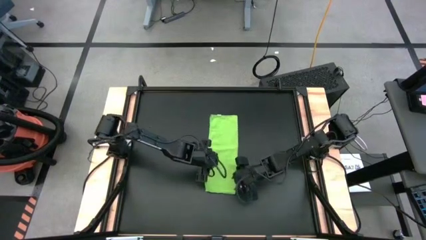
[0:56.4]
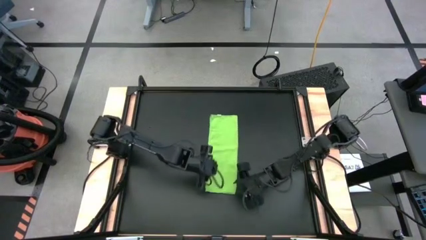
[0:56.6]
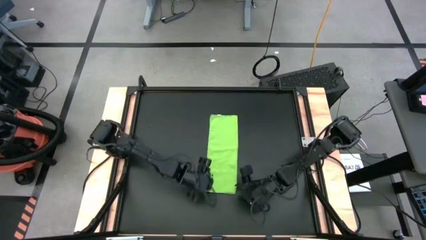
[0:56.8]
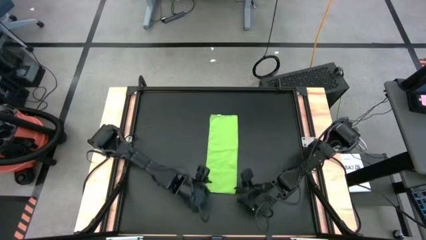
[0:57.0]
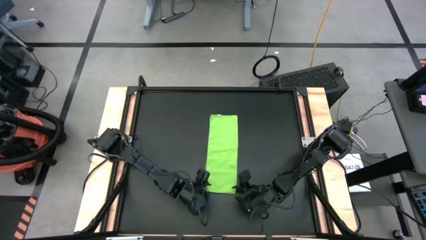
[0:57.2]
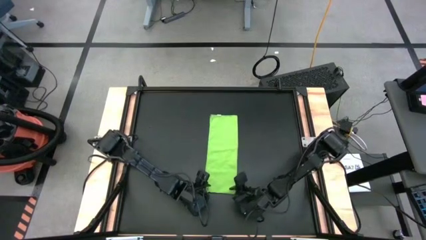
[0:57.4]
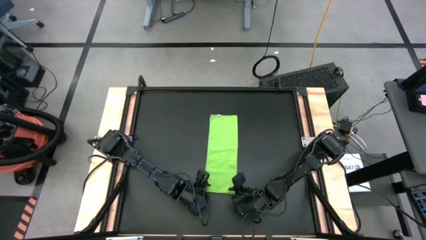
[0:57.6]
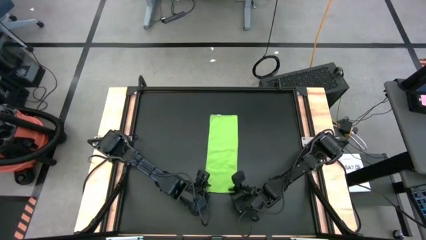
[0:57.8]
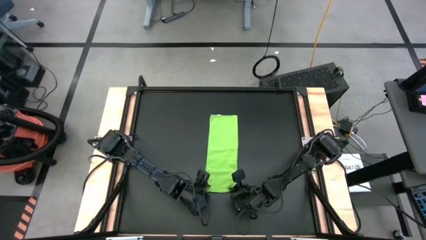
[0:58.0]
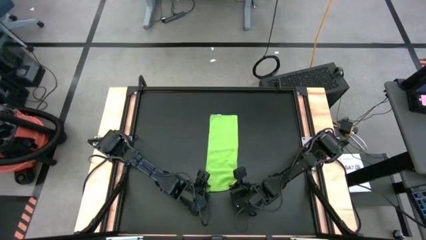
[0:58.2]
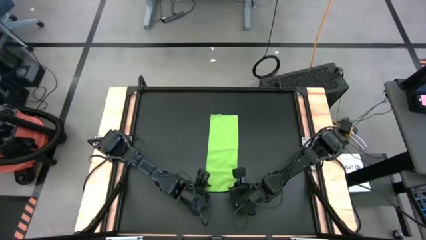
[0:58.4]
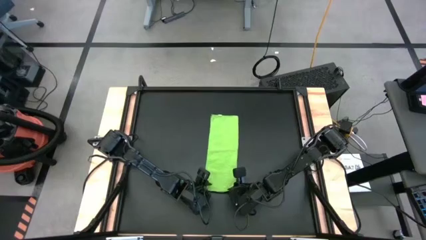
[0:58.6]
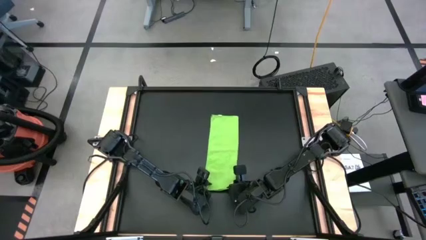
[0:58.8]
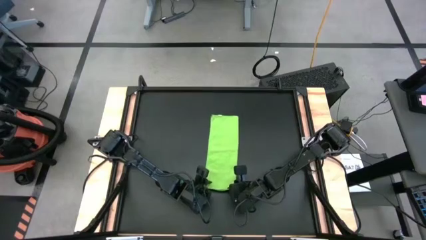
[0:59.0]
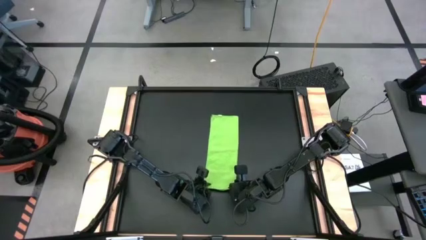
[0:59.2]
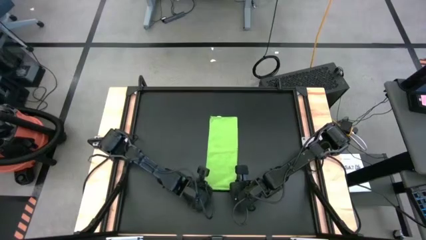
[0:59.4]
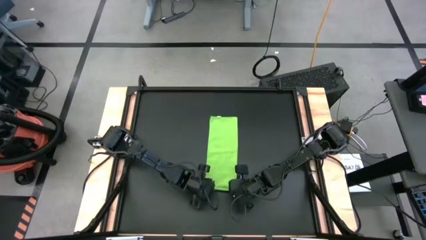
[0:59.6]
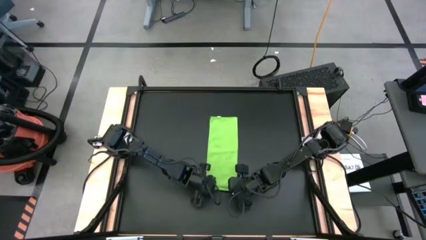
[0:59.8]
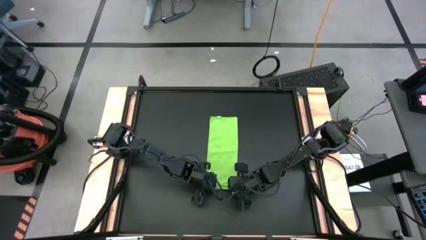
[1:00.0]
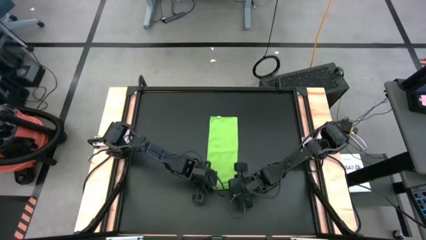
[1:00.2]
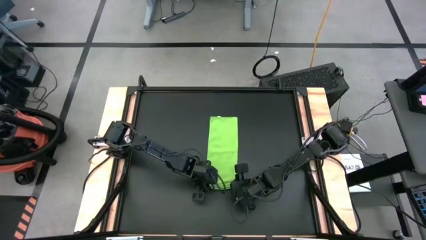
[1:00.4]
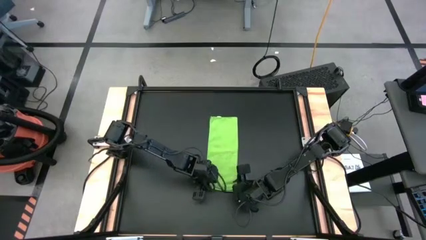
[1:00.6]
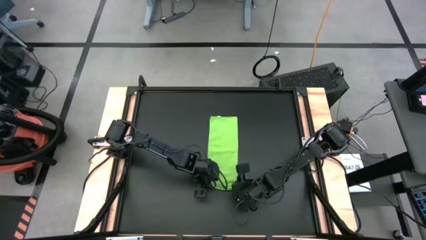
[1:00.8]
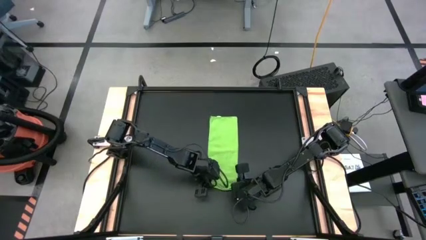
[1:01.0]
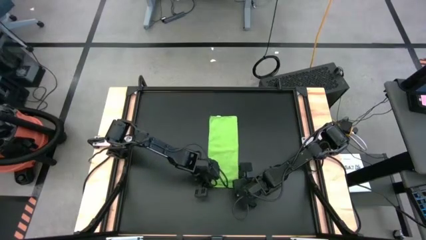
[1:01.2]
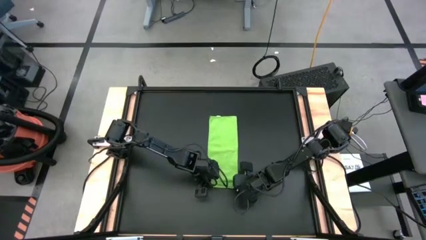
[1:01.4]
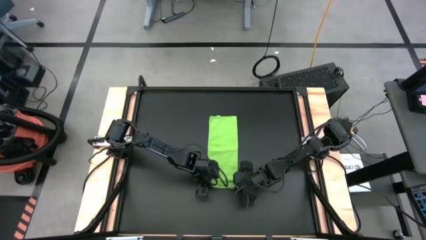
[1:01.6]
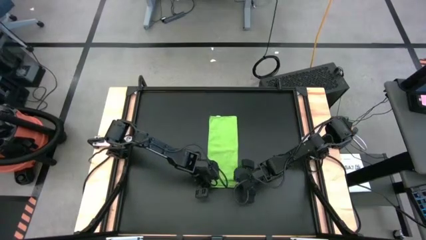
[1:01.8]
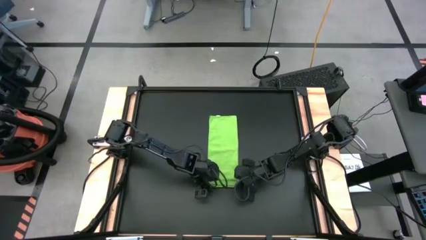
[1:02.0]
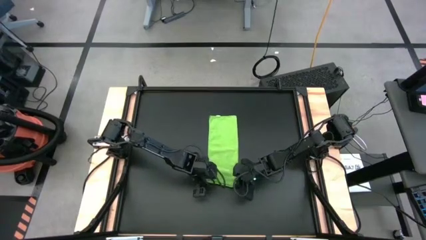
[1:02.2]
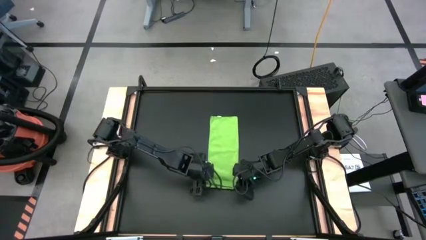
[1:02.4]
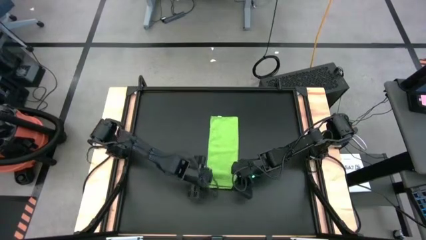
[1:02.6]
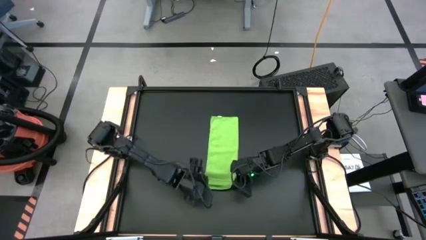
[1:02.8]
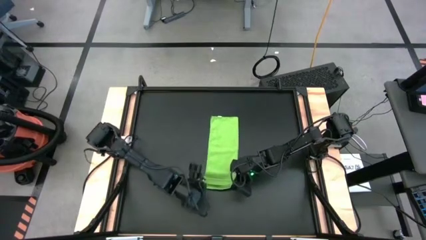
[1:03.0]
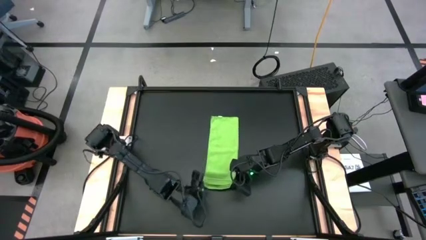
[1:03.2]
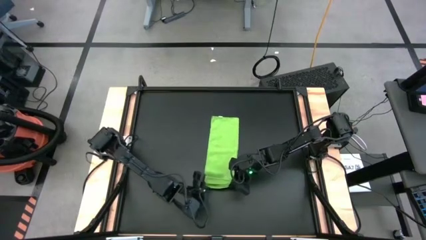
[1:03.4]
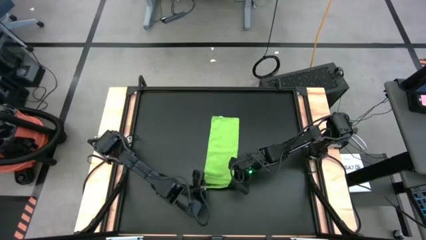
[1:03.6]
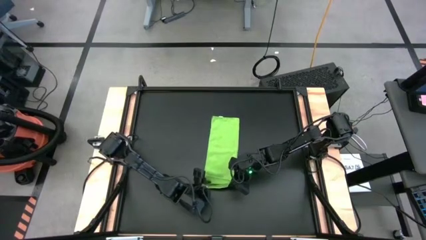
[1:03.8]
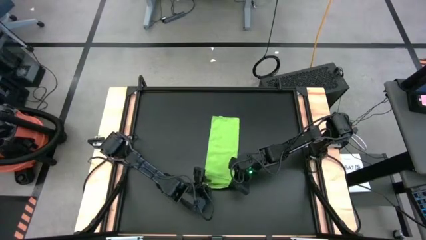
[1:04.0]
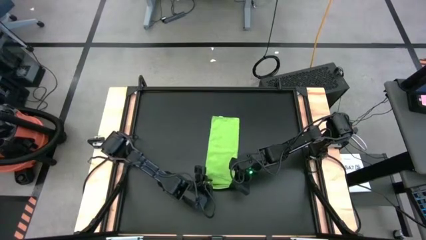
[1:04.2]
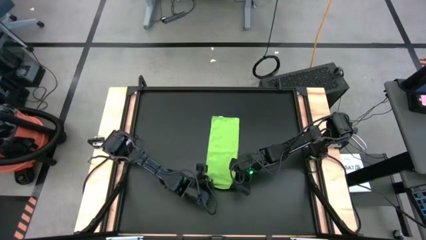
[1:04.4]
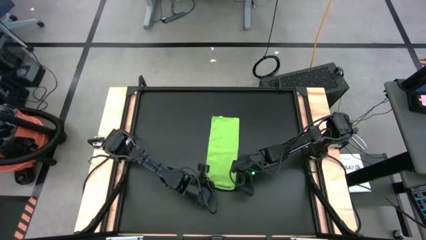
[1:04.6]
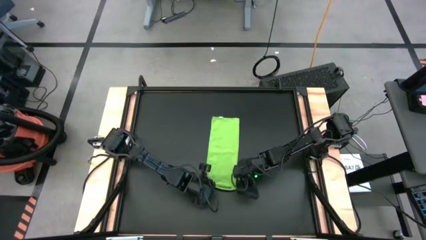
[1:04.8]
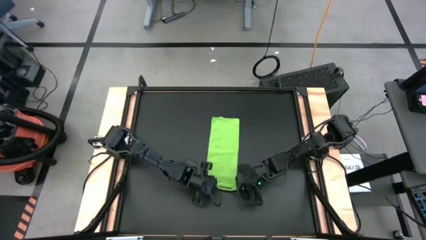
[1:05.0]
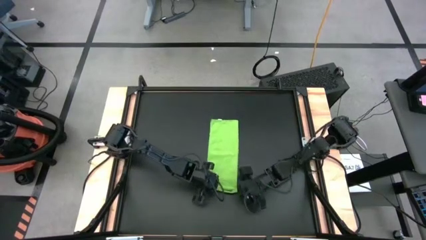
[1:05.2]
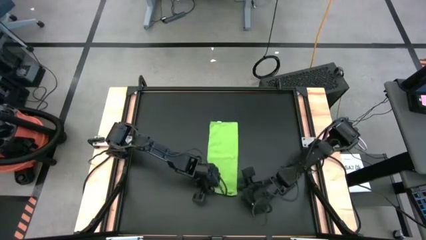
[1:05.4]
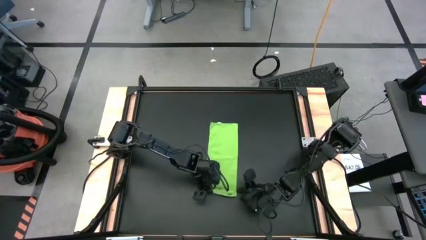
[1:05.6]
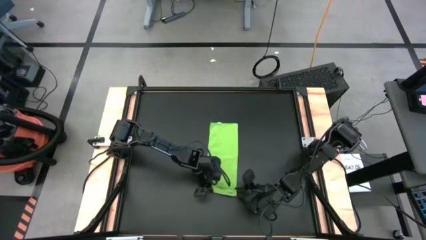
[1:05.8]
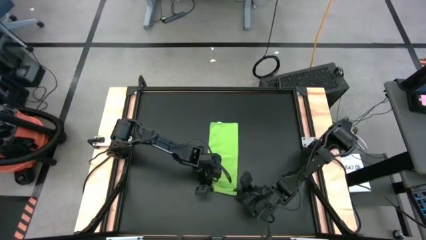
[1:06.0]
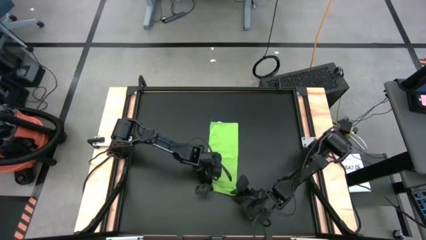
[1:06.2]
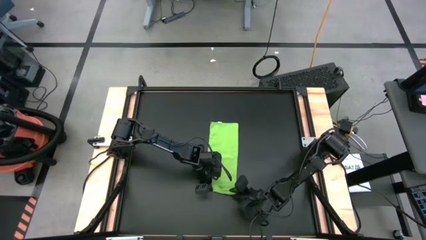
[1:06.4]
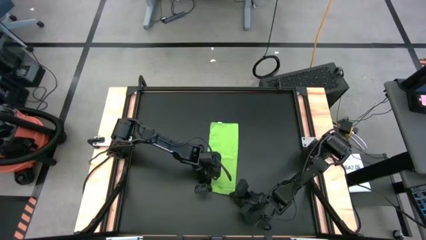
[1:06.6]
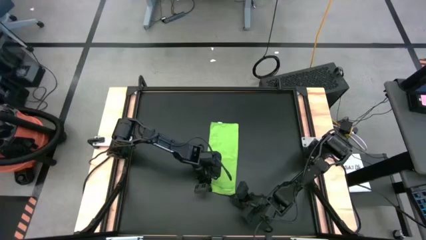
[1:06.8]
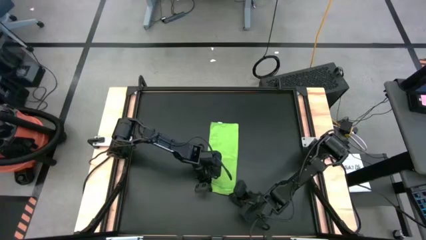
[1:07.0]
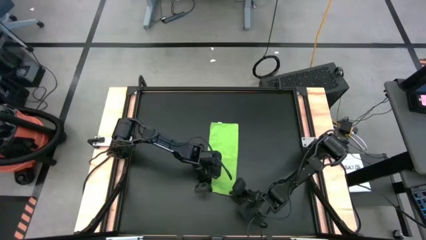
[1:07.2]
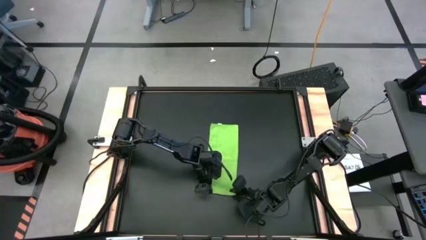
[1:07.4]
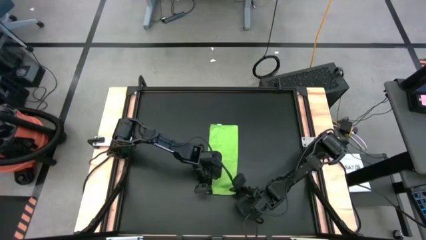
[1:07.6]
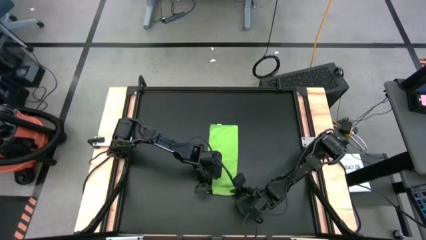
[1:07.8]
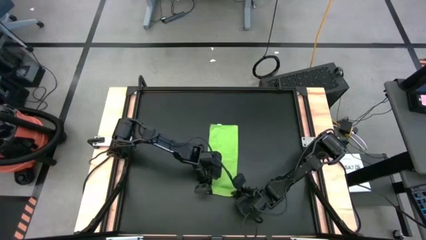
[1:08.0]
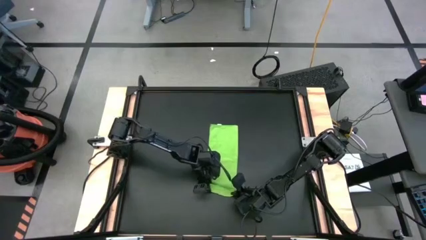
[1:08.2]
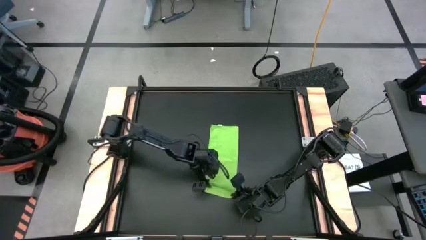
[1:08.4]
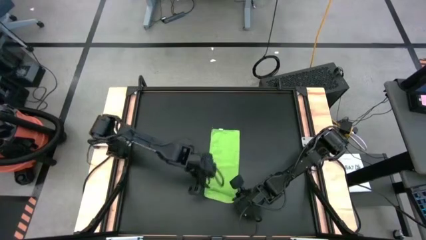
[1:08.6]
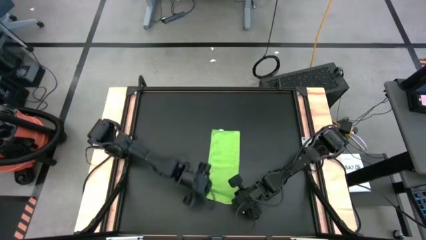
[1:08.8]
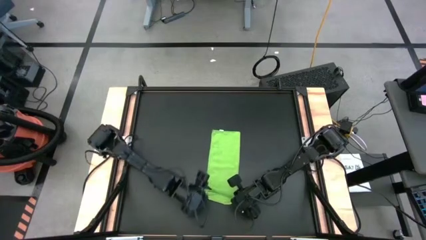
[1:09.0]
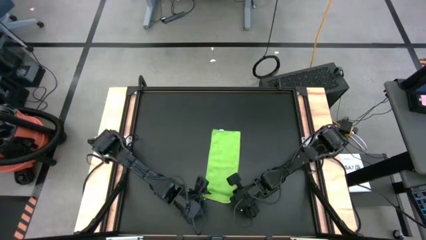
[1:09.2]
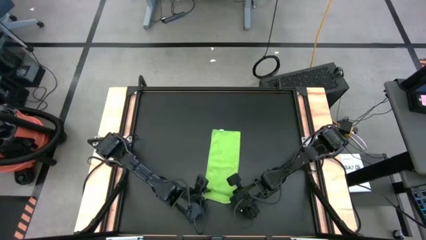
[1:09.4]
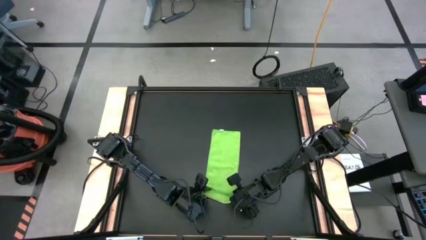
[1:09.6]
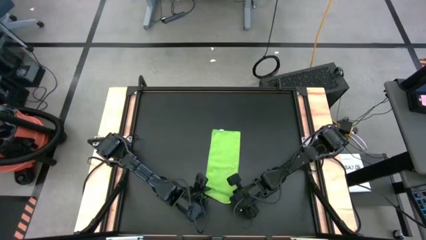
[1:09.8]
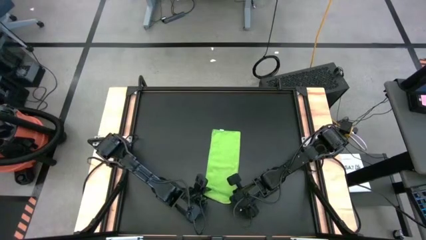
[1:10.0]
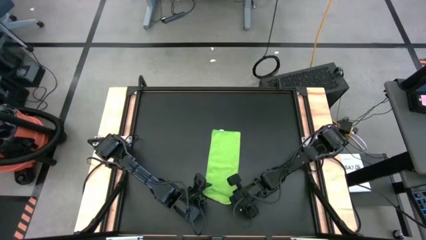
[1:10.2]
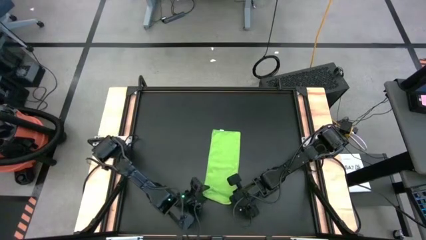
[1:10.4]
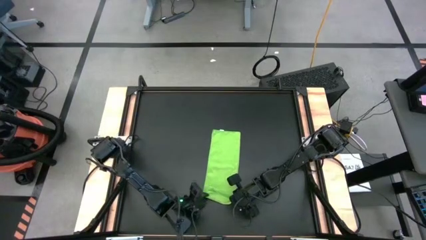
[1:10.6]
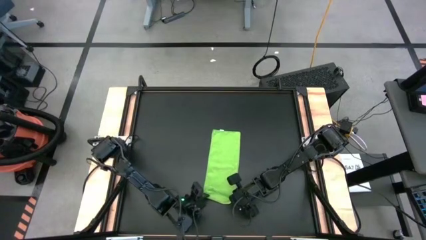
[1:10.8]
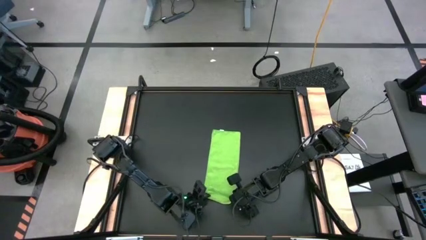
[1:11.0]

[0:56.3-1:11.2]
Task: Roll towel into tight, uniform cylinder
Roll the green towel
